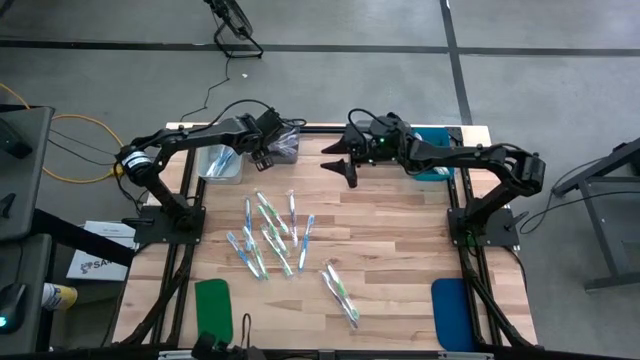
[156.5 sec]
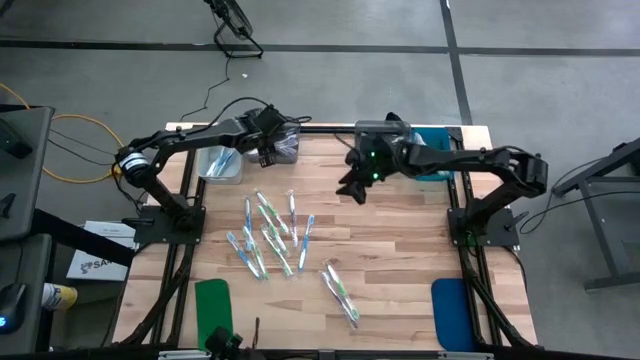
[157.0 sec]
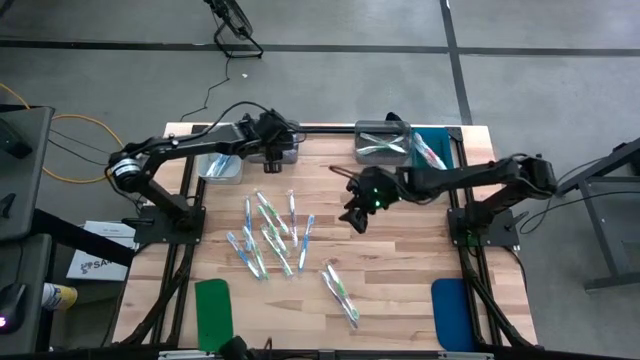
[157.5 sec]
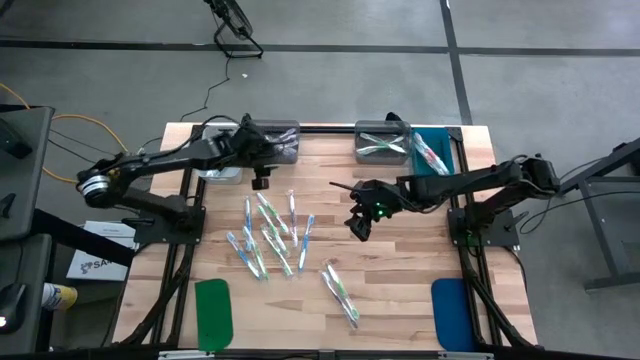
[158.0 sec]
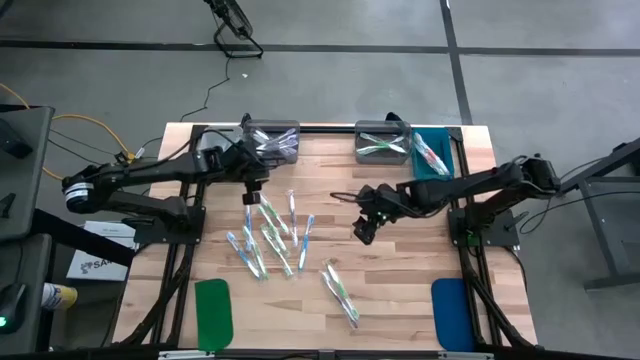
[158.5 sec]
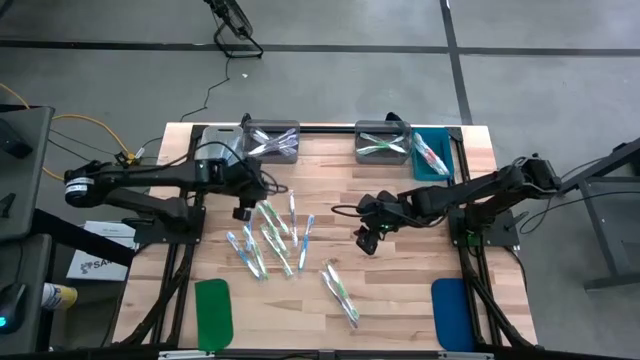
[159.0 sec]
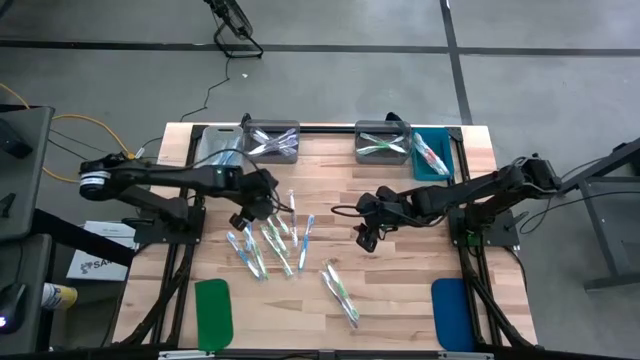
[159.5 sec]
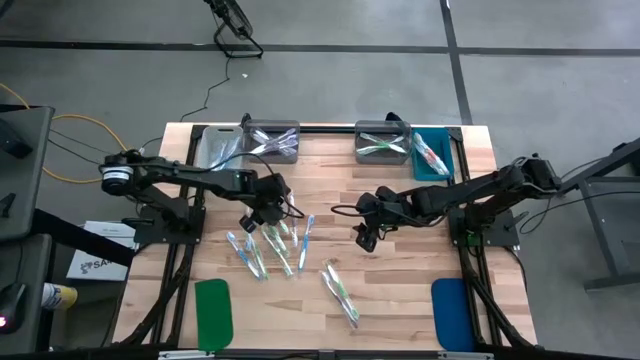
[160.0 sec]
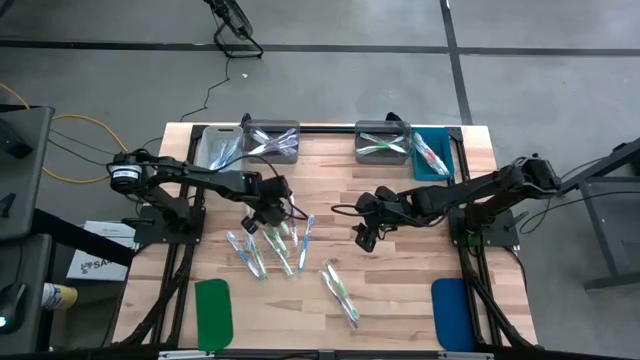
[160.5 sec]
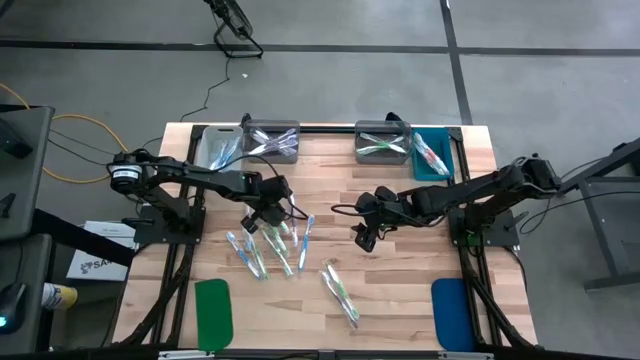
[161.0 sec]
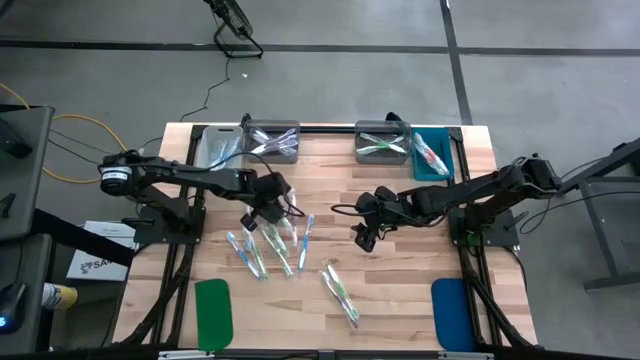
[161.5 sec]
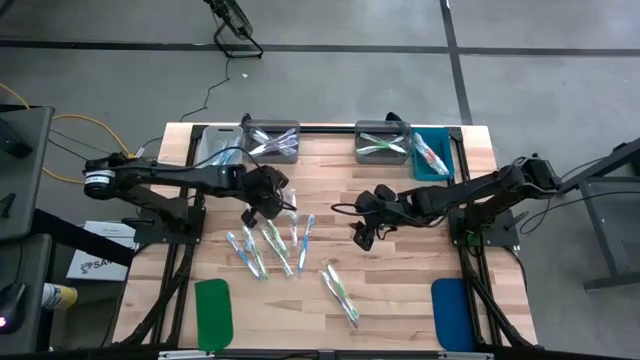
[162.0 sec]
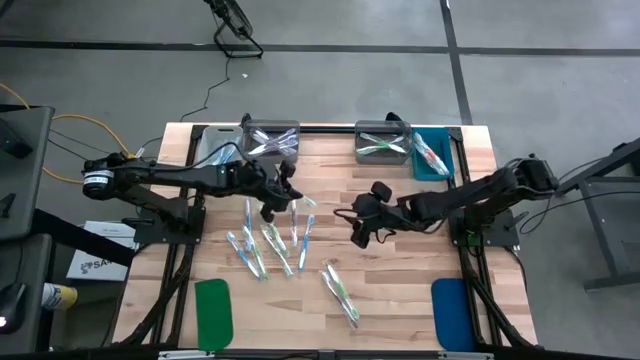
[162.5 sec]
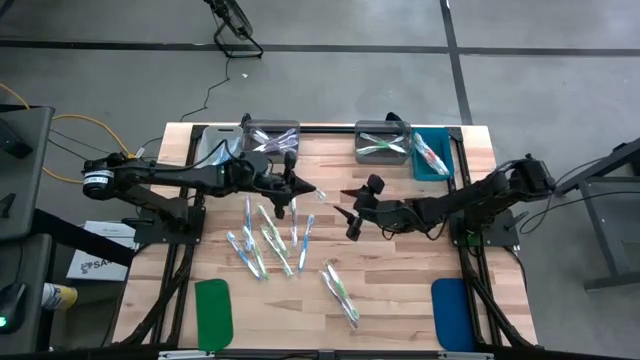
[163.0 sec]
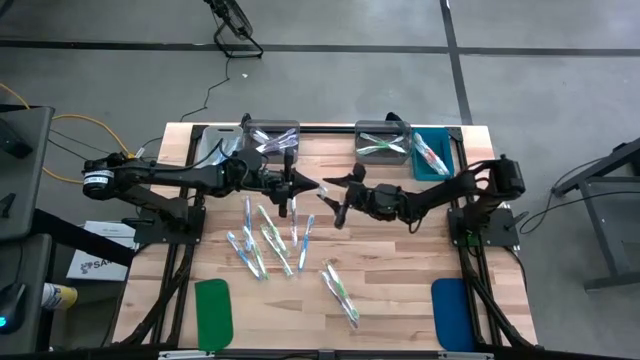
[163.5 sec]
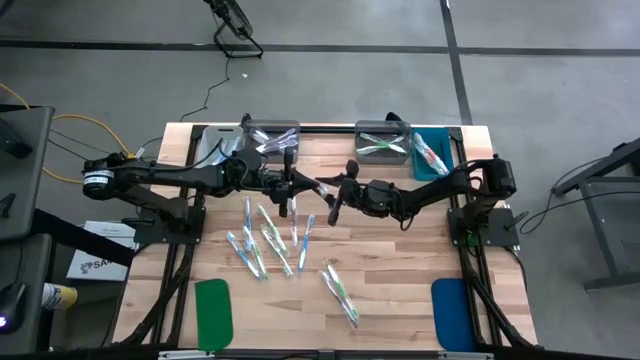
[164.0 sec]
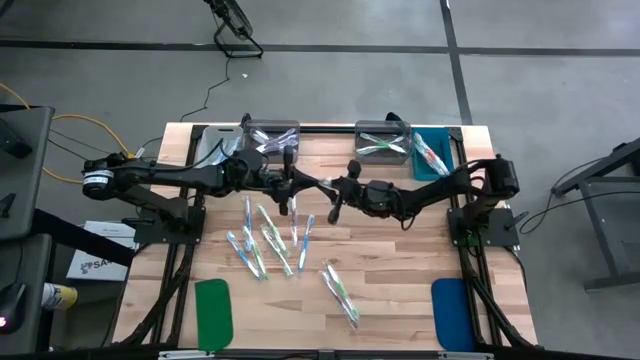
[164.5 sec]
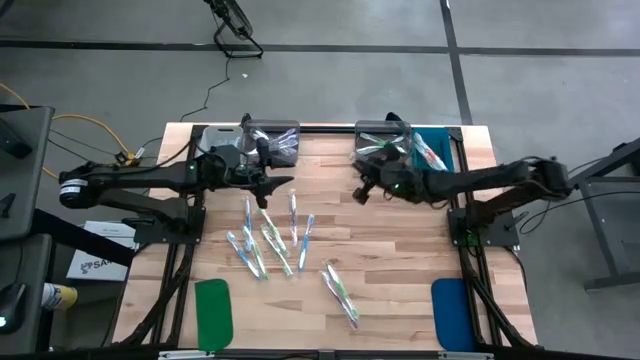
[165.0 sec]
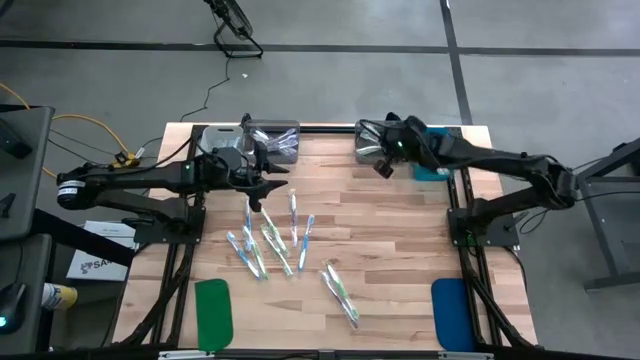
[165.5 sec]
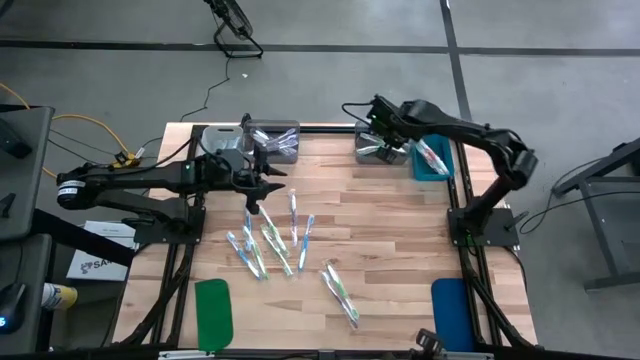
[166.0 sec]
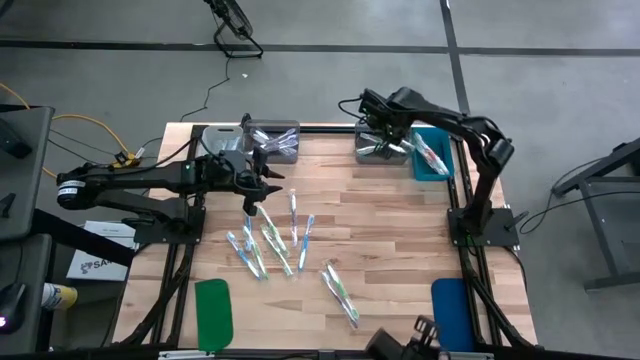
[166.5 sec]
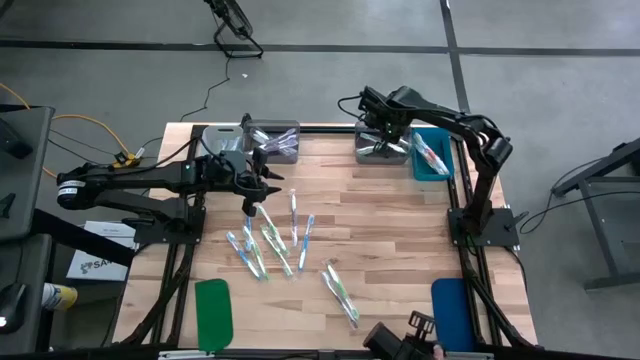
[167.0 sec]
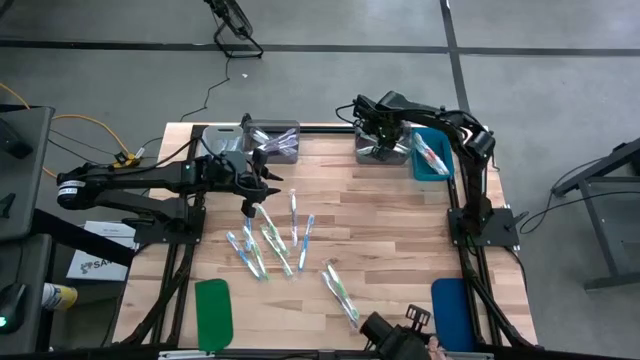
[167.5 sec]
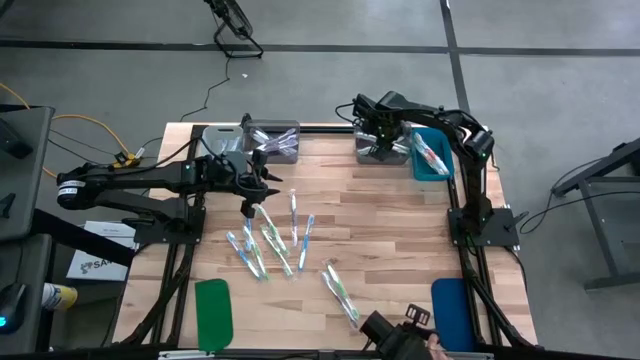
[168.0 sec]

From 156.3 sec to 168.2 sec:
Task: Pick & Place Toothbrushes
Put the green toothbrush into the right black bin

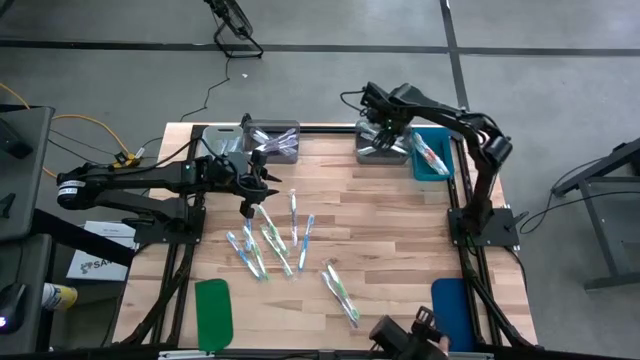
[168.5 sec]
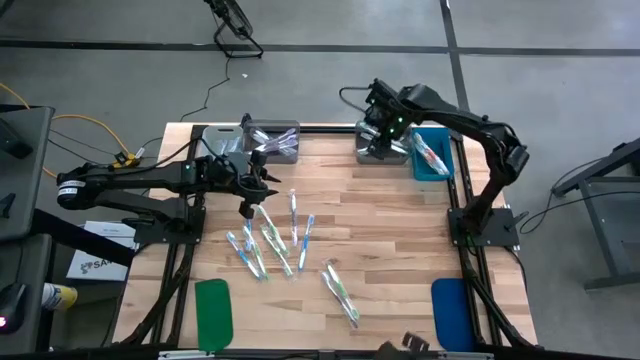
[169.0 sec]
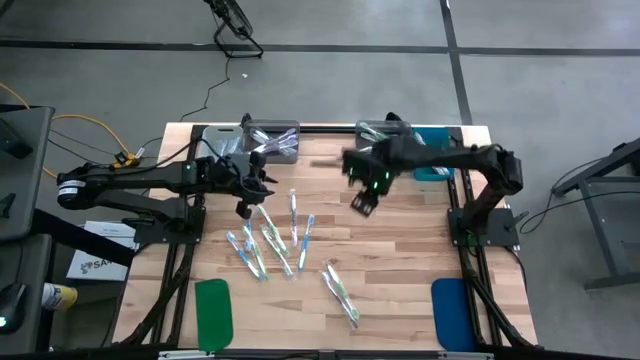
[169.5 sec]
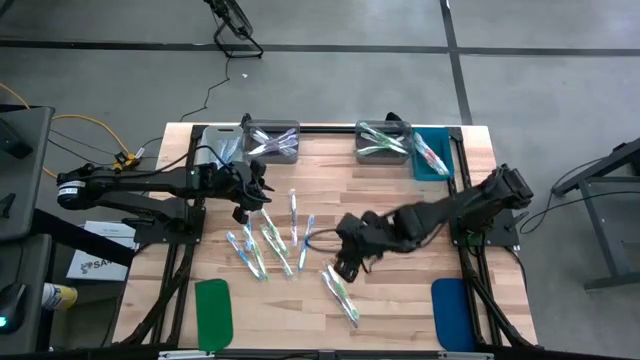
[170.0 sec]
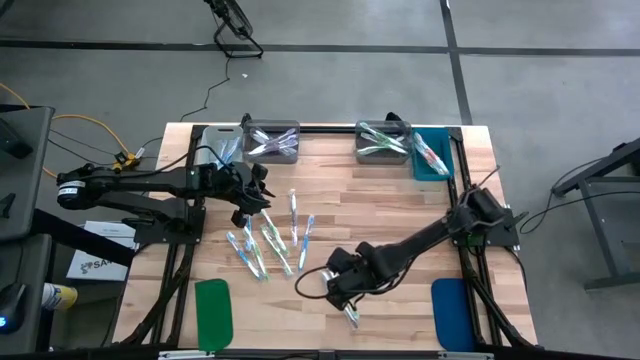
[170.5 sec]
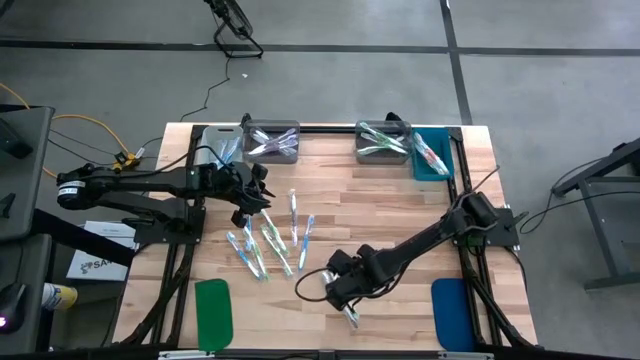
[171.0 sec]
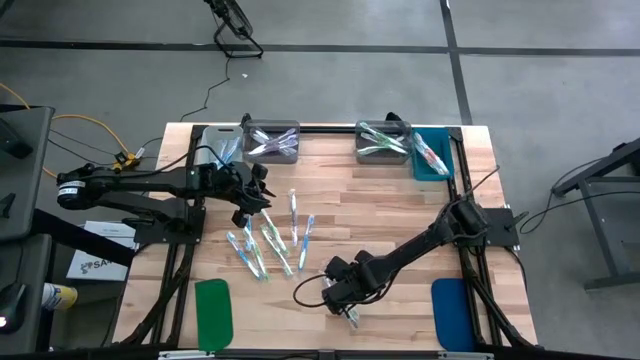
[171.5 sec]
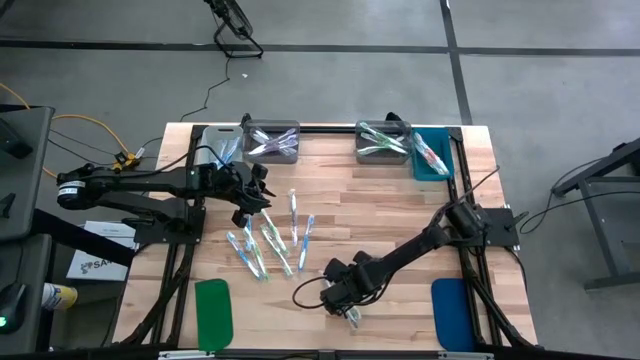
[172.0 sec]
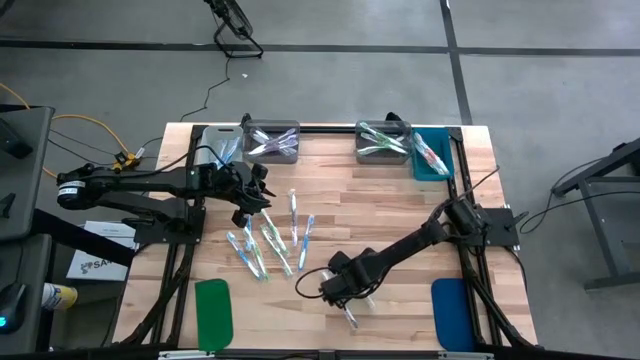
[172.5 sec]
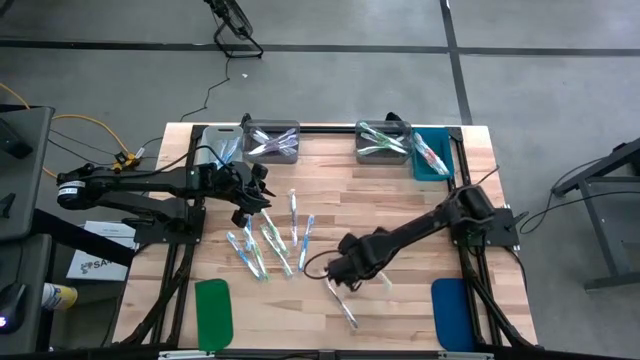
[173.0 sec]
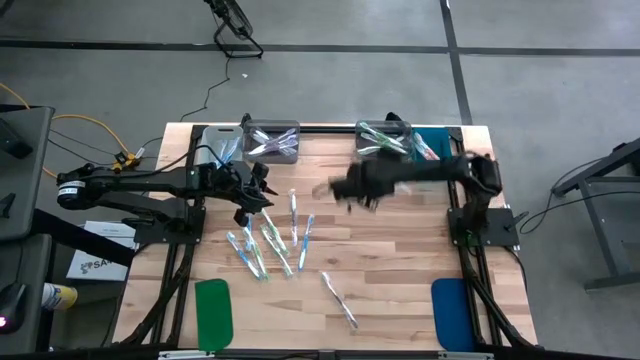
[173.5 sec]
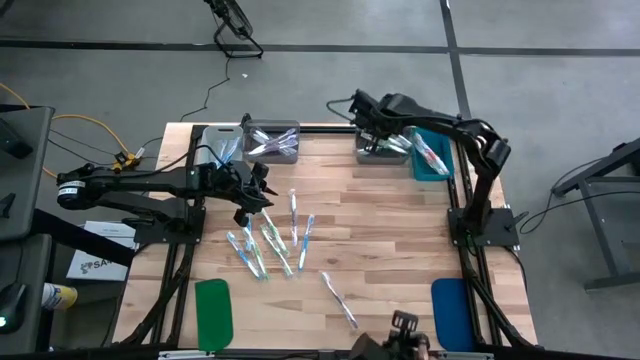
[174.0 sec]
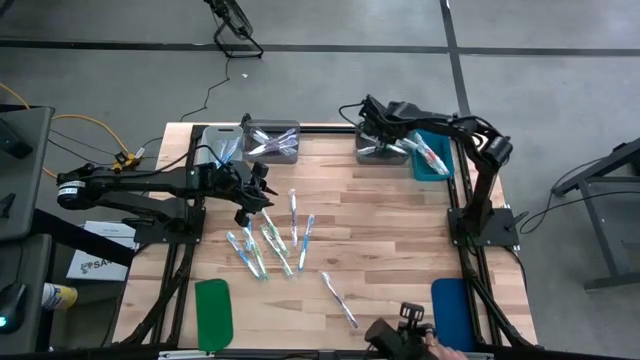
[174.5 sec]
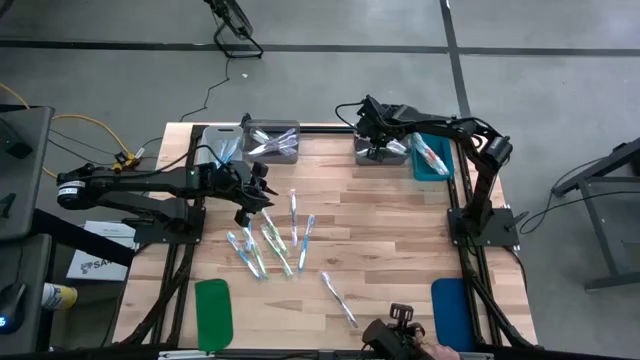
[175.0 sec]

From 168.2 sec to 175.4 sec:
Put the green toothbrush into the right black bin

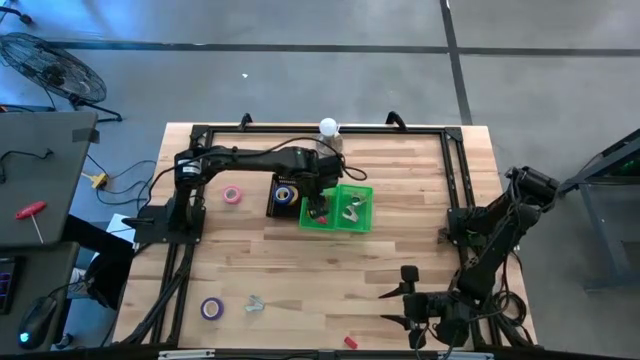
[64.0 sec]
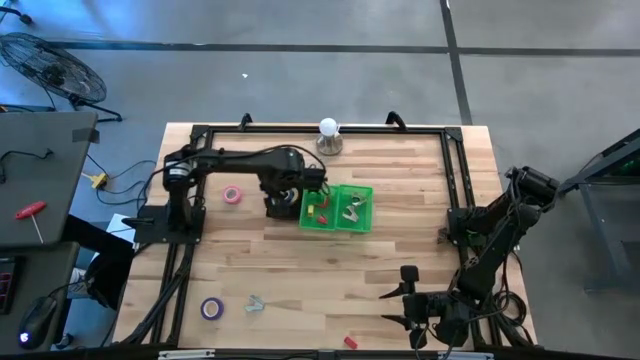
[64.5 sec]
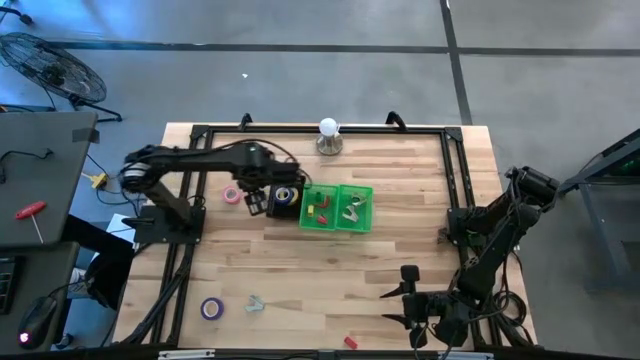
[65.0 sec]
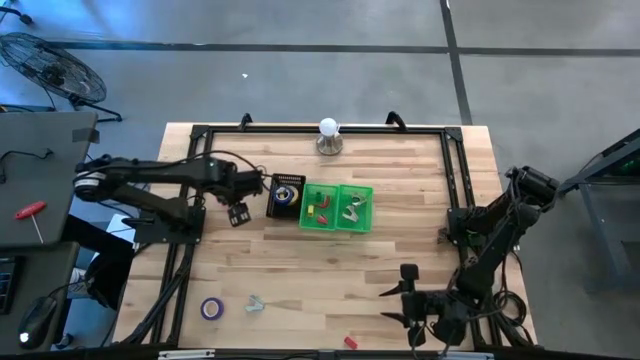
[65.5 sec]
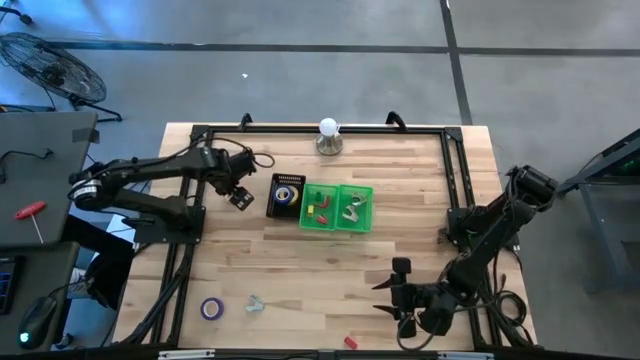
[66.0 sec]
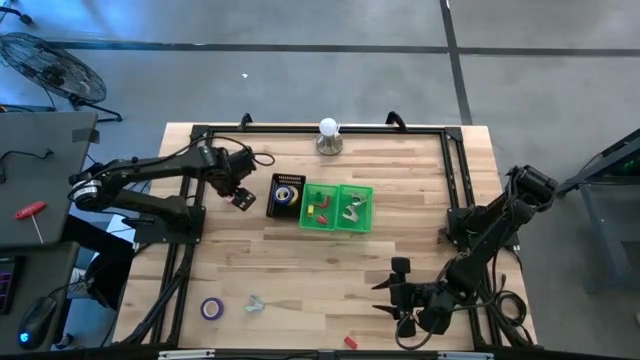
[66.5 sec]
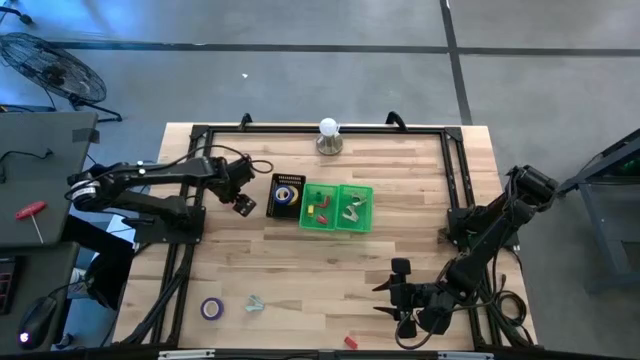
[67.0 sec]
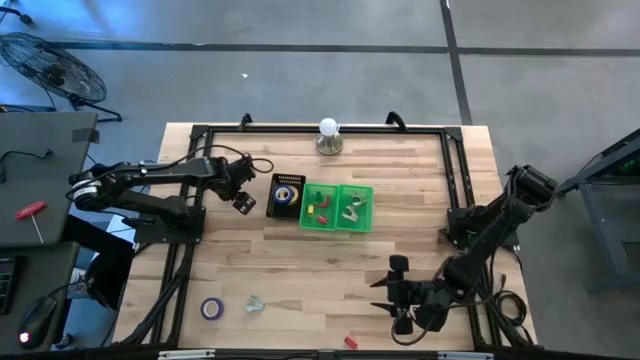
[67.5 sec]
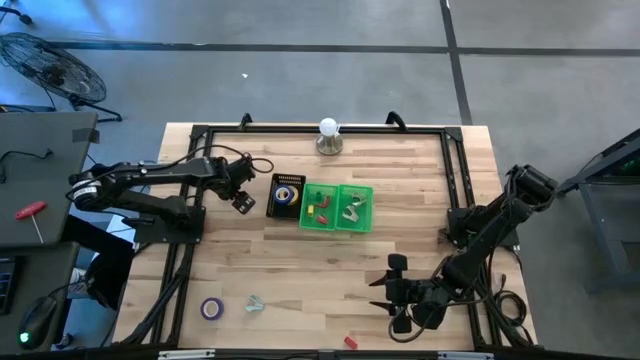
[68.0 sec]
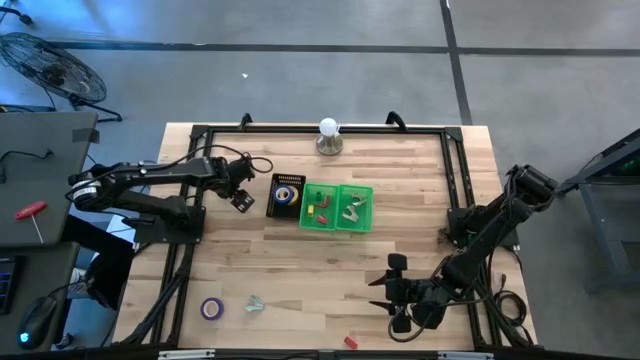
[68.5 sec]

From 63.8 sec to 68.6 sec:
Task: Pick and place Stapler, Stapler remover, tape
Put the pink tape into the black bin
